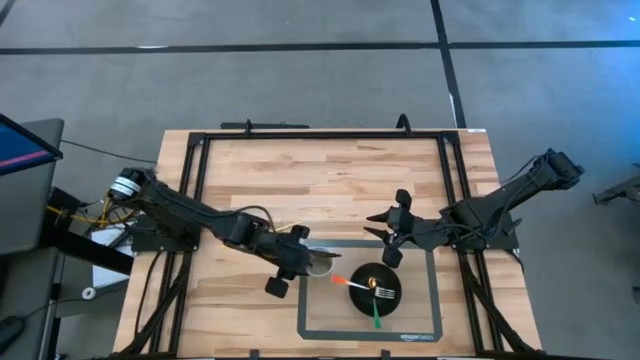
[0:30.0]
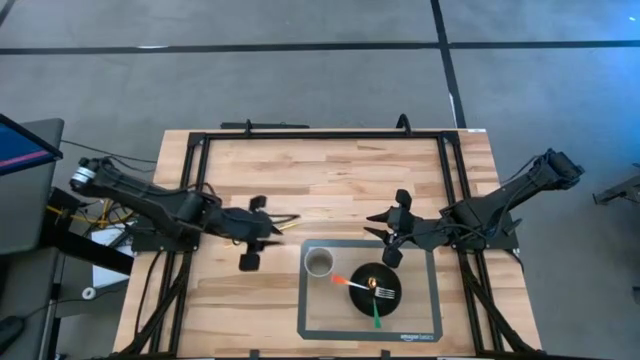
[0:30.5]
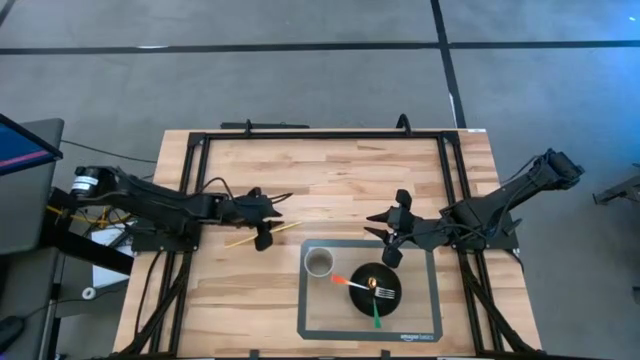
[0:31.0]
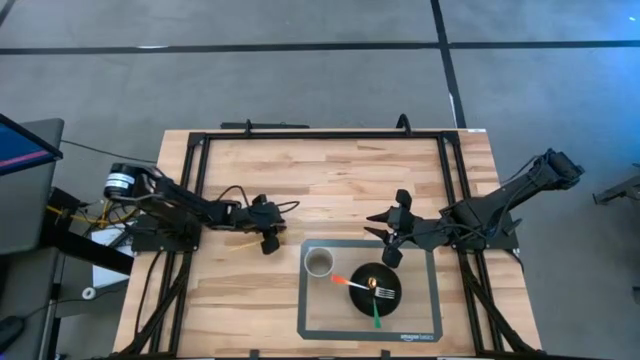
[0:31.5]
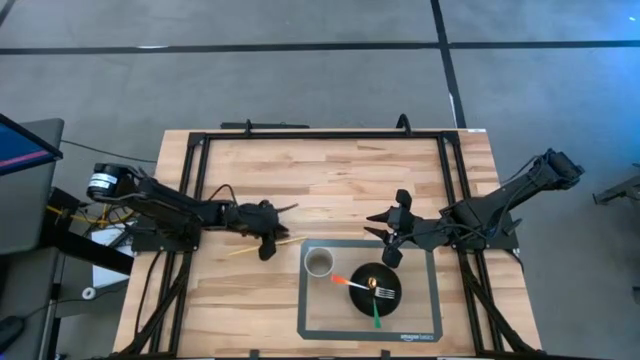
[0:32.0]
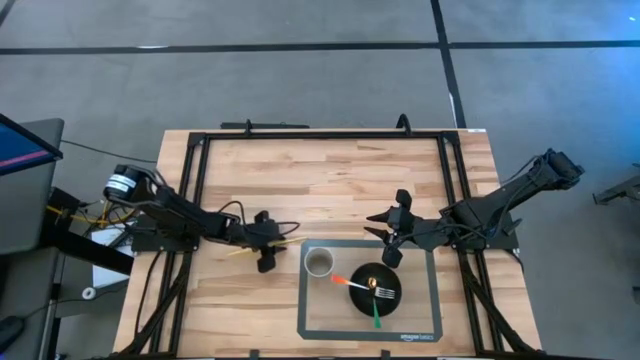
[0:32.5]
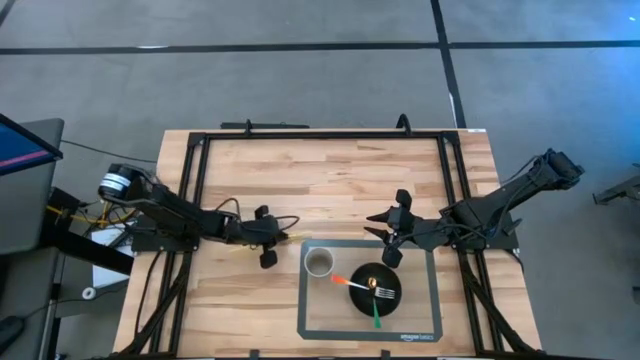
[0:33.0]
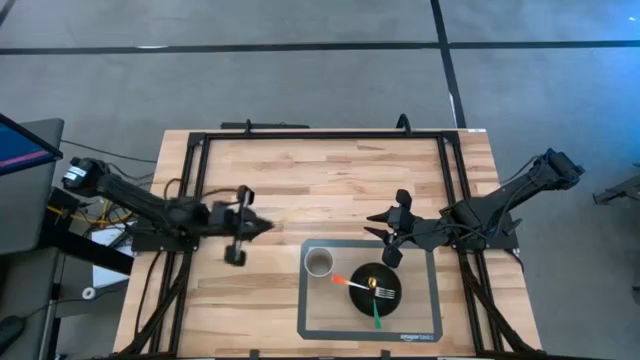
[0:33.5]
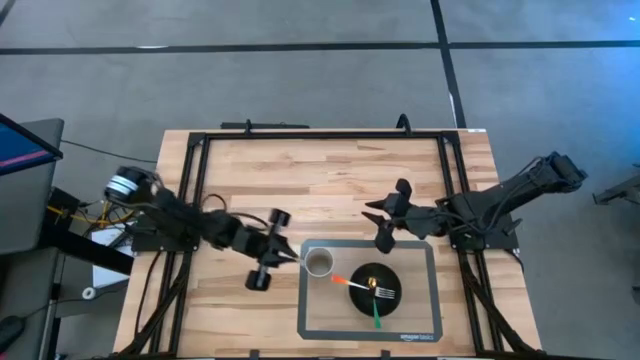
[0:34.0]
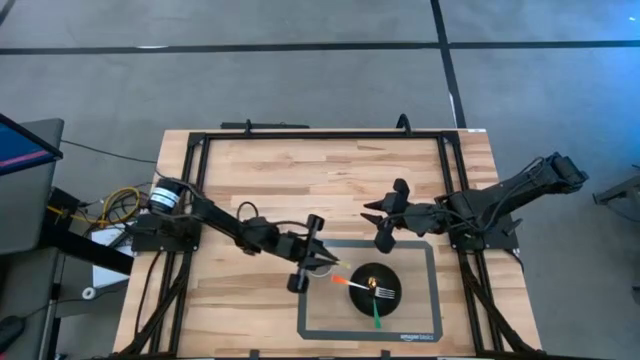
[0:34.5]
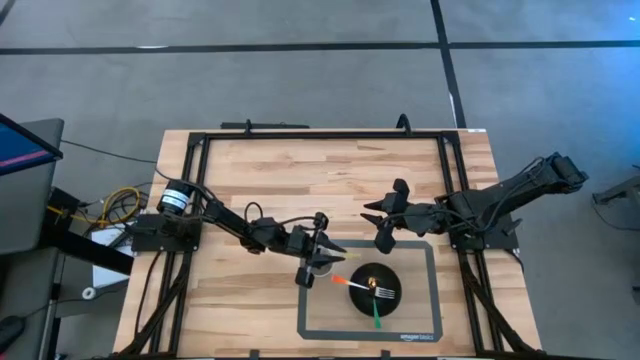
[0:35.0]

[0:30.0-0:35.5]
Task: Pick & Place Utensil
Put the yellow straw into the cup Return to Home Position

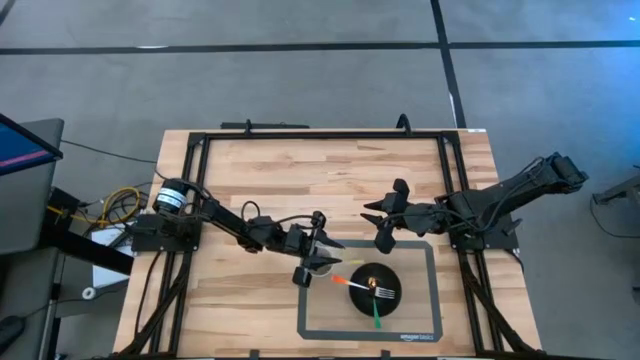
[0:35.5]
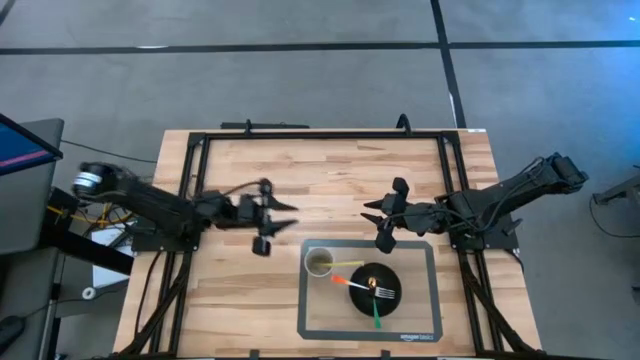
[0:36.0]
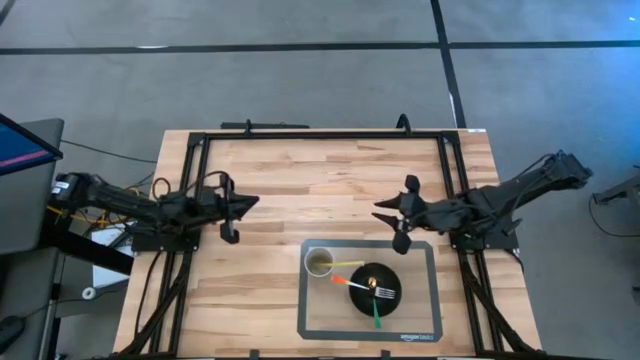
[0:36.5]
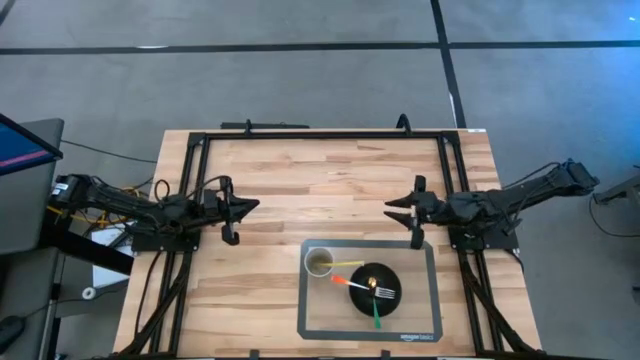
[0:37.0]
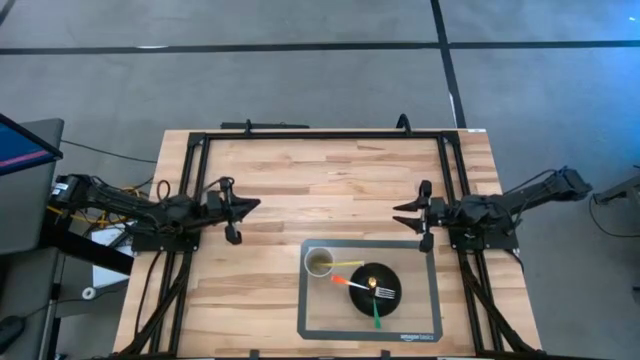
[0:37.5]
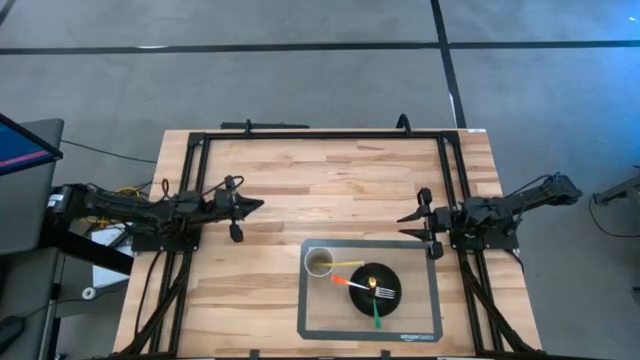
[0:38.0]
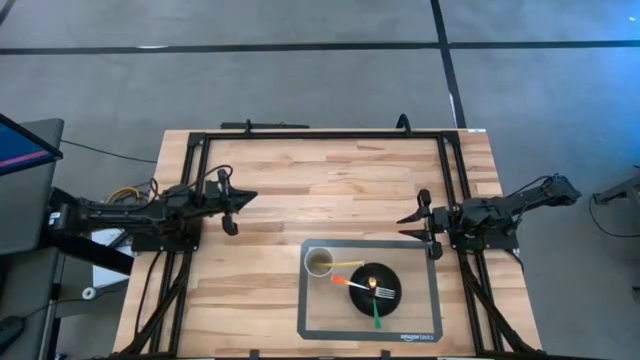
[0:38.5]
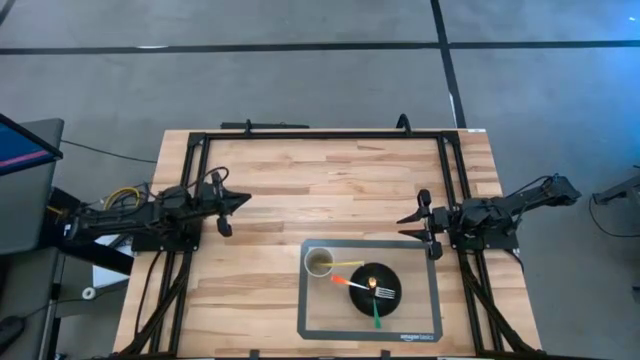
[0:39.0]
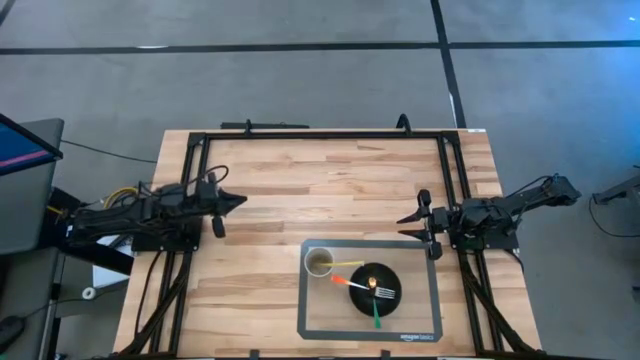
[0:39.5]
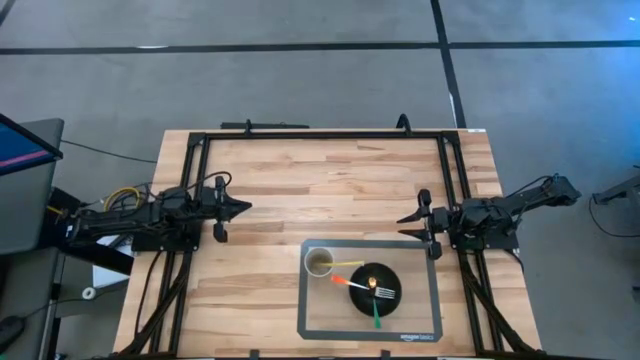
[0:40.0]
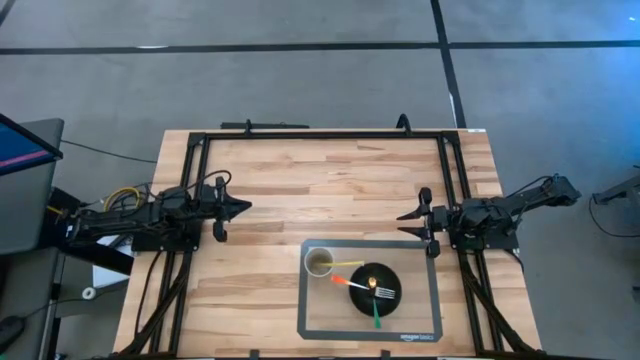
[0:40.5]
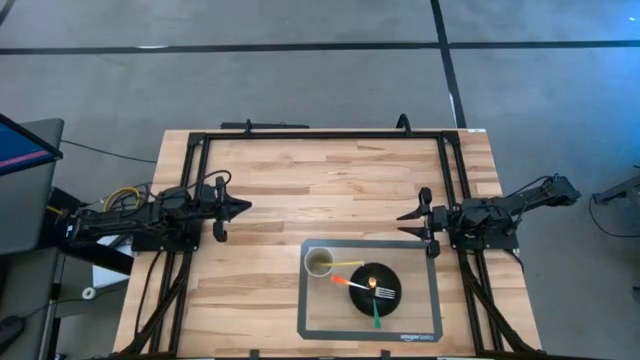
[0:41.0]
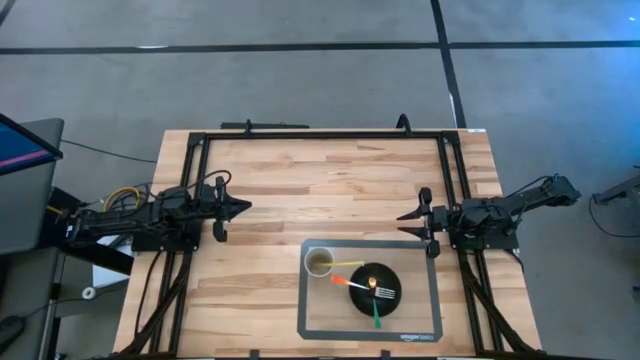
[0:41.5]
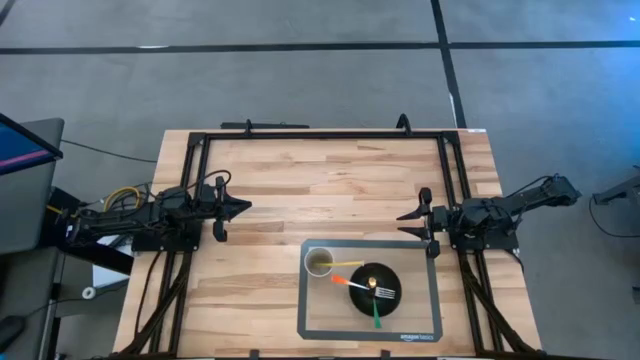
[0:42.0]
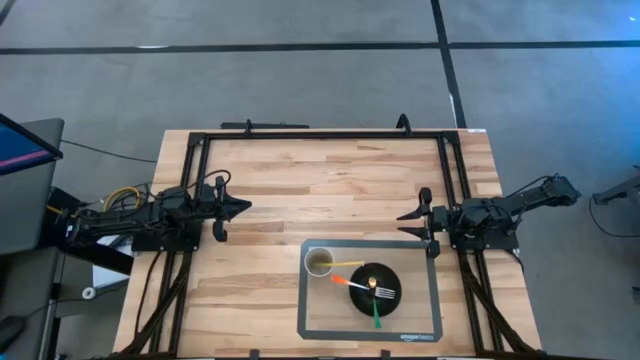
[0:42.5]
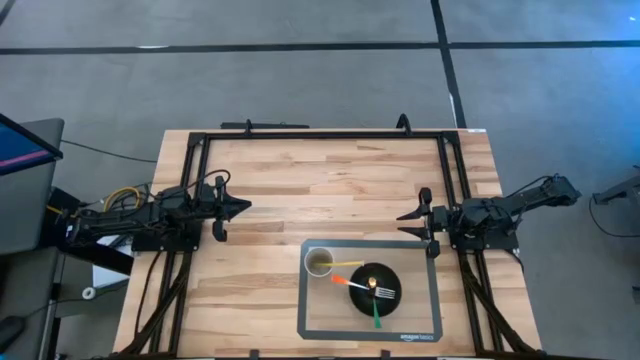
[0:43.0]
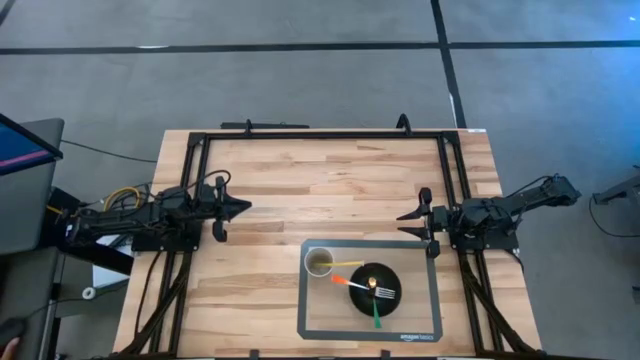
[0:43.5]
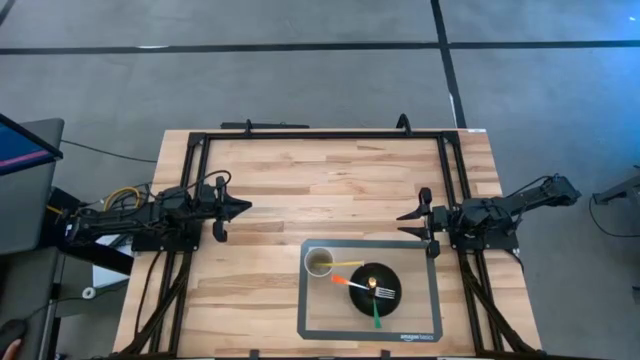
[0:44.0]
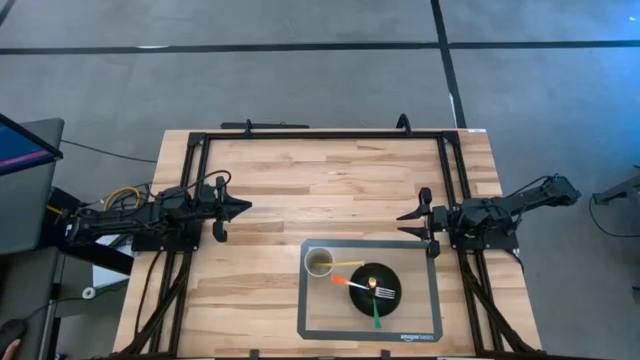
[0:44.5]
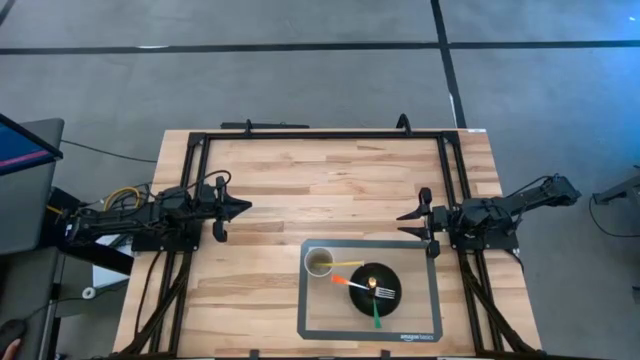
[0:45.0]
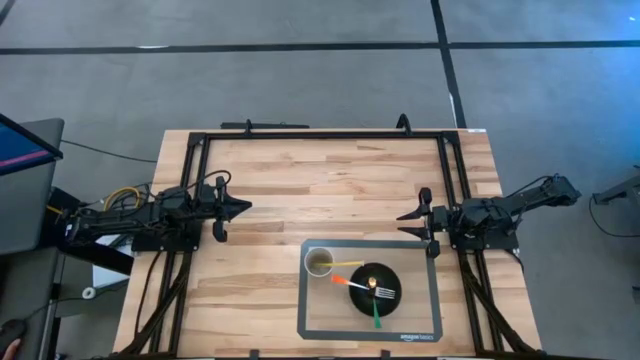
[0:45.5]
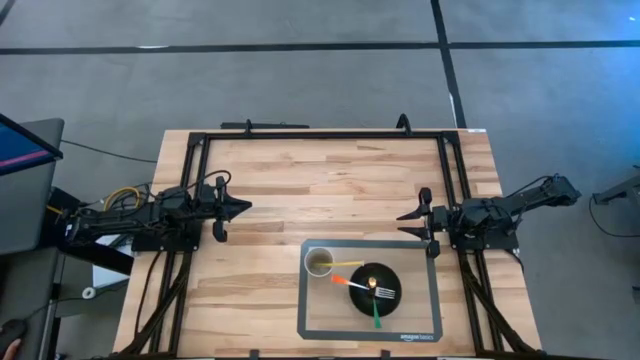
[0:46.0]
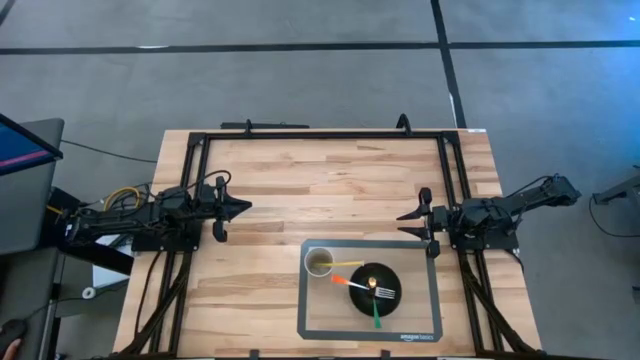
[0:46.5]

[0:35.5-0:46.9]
Return to Home Position

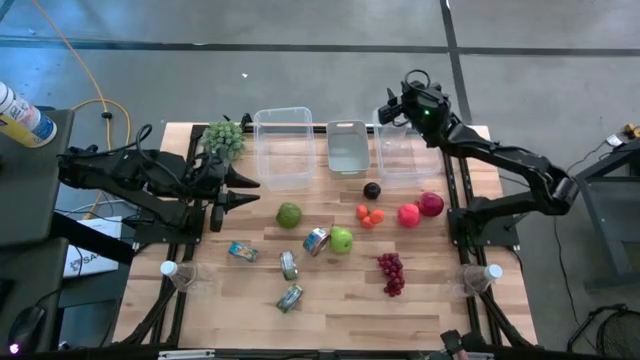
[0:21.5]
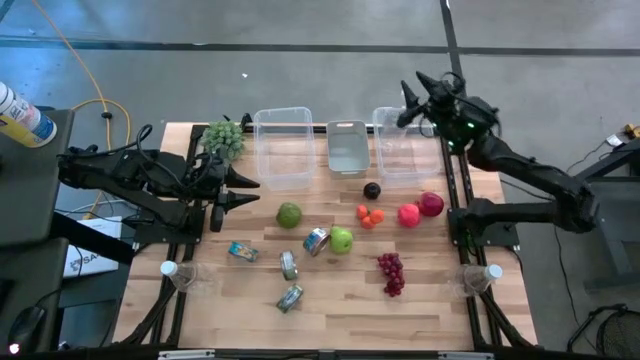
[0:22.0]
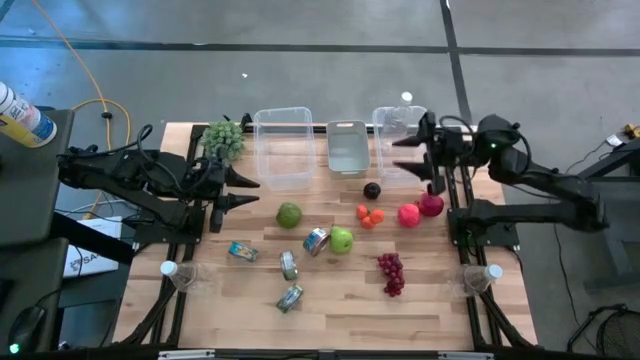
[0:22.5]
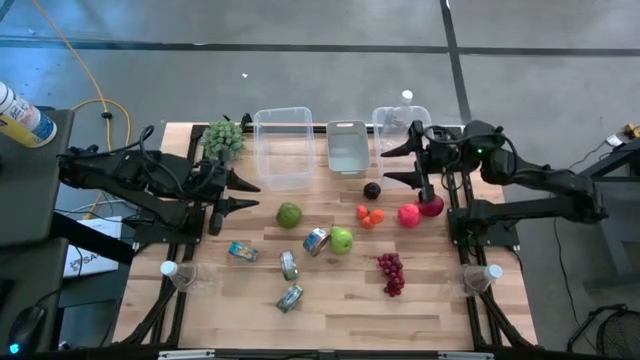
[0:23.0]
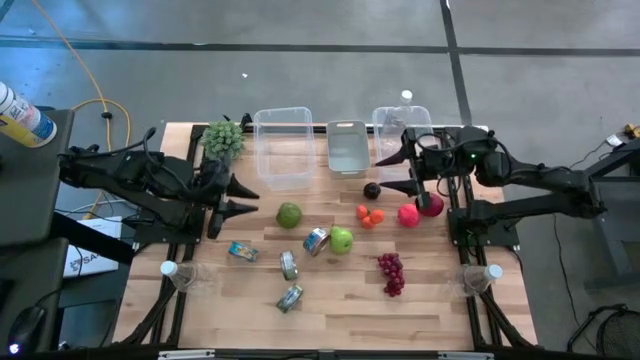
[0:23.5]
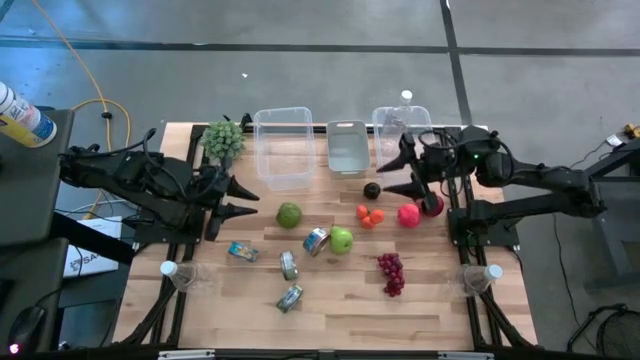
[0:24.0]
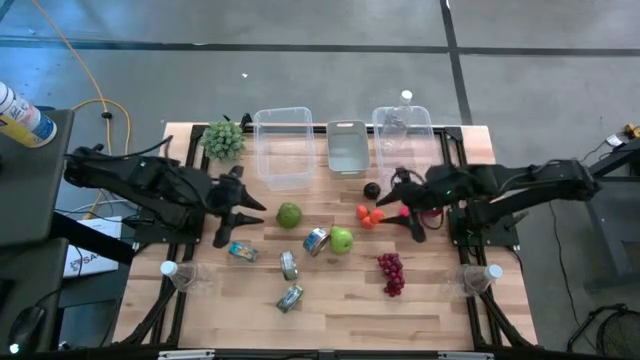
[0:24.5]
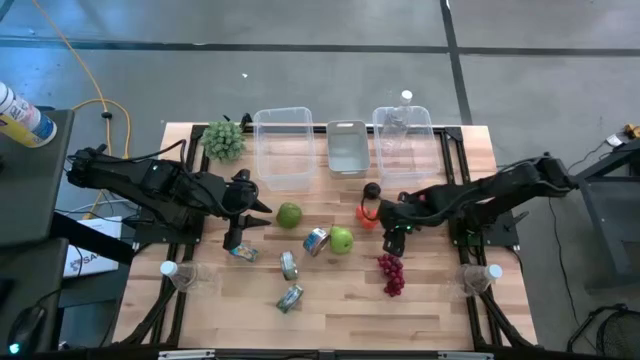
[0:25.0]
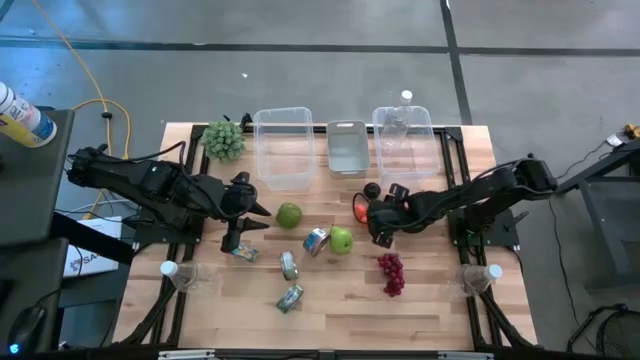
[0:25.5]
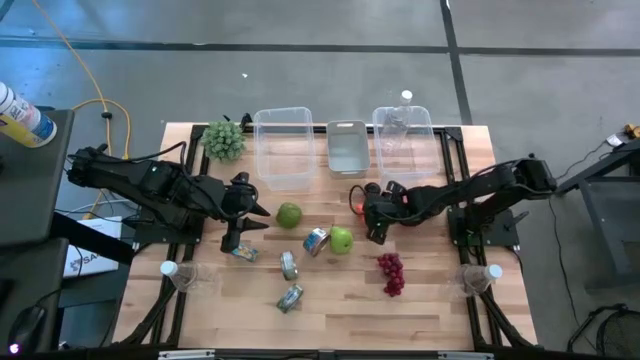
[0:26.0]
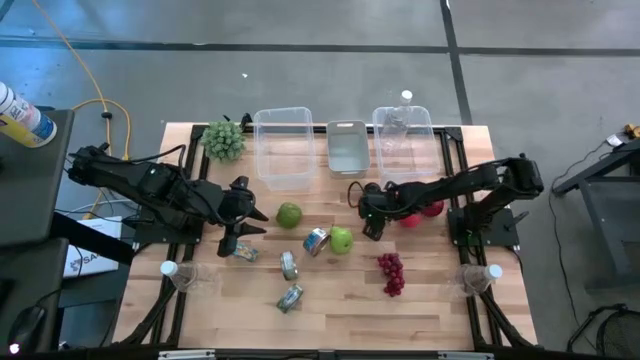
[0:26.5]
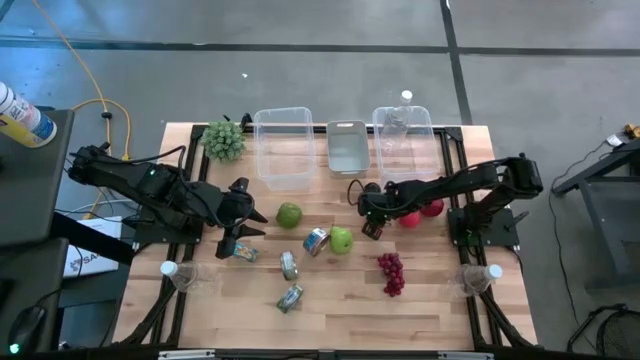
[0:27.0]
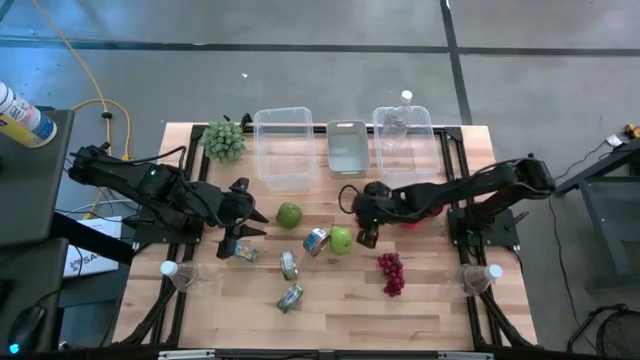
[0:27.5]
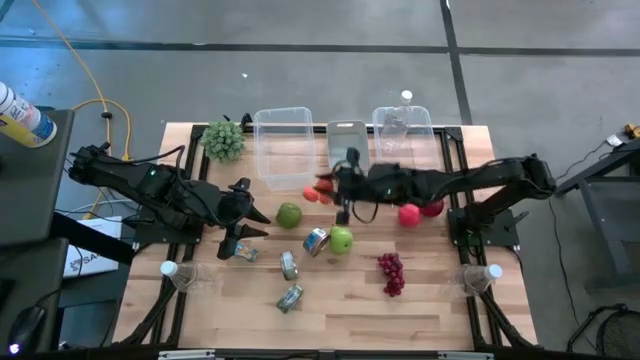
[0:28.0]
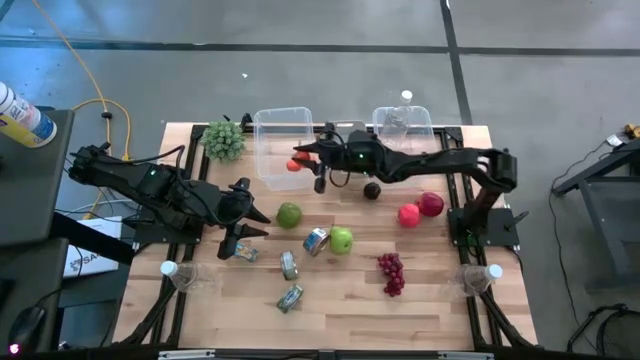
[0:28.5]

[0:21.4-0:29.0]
Task: Pick & Place Food Item
Put the tangerines into the left transparent bin
